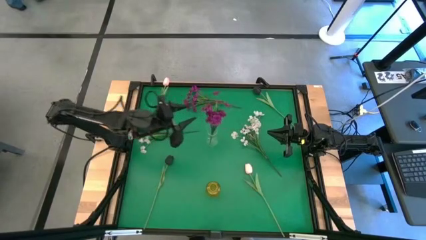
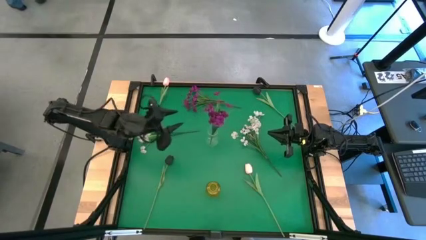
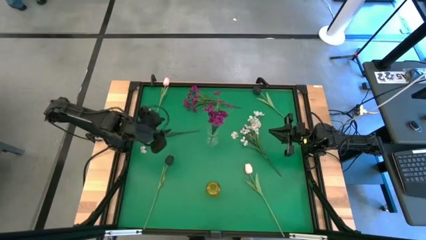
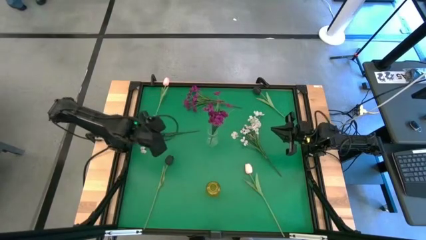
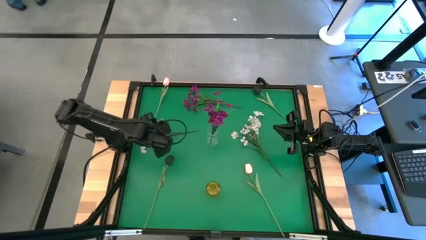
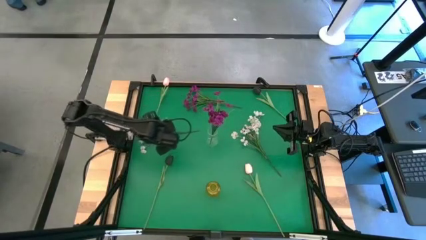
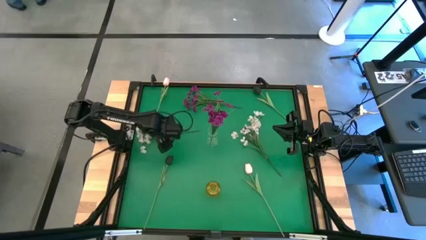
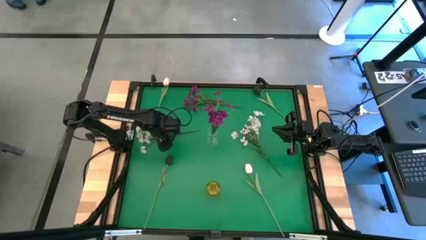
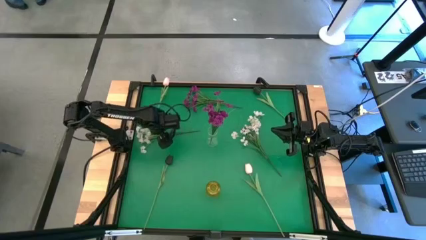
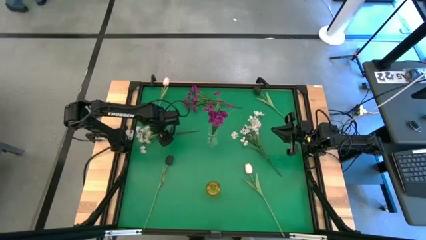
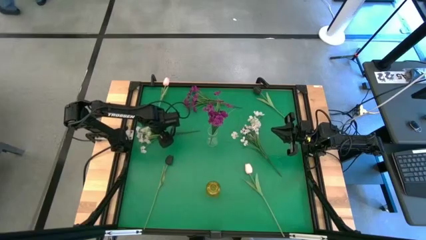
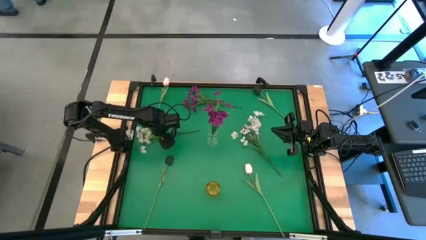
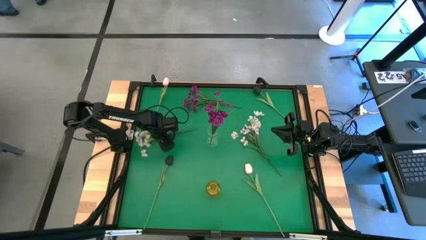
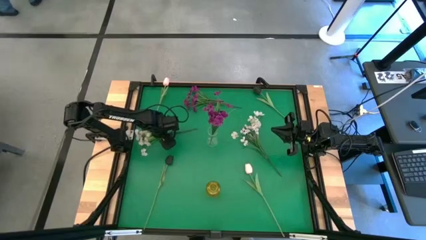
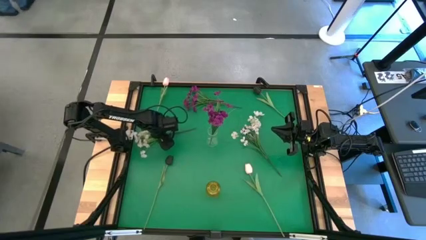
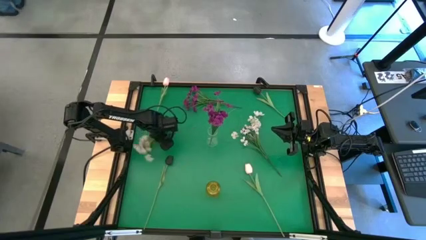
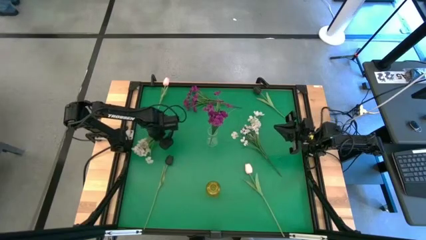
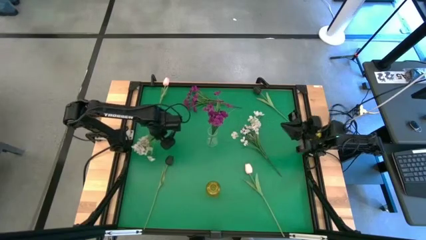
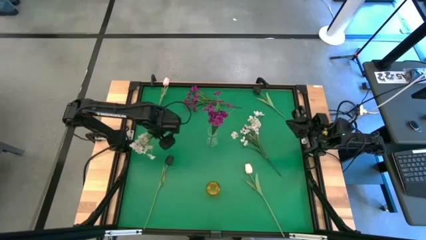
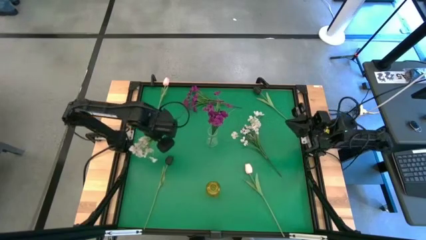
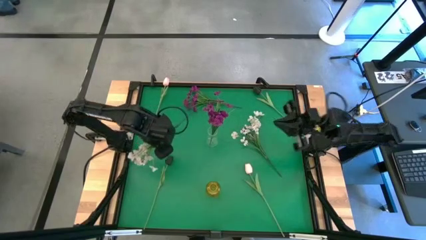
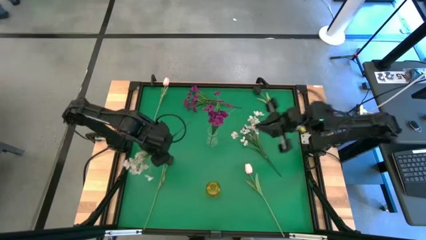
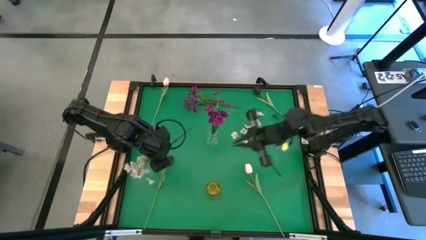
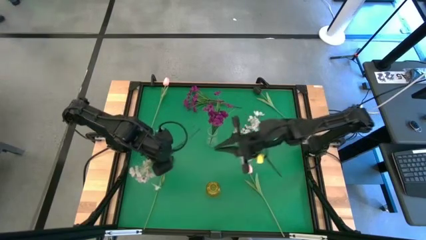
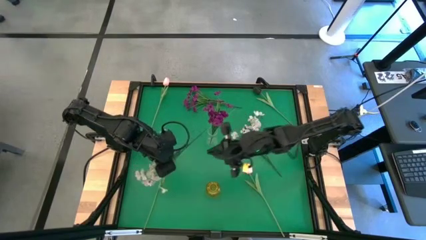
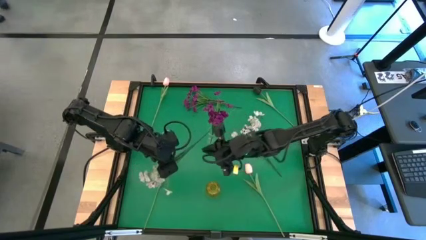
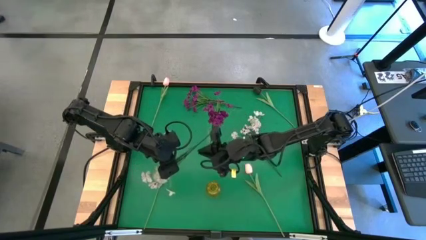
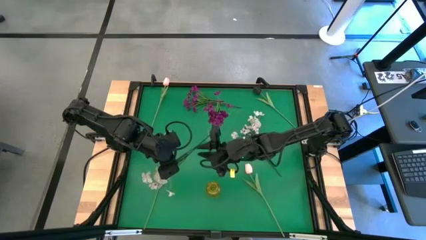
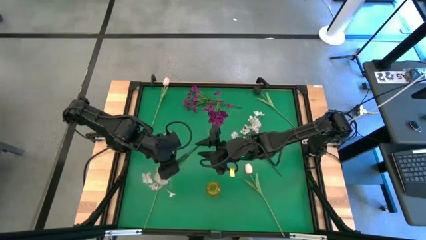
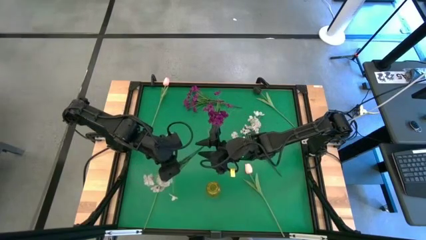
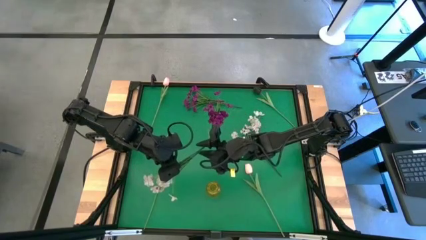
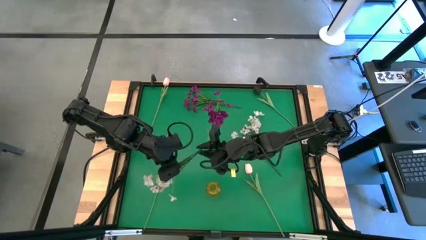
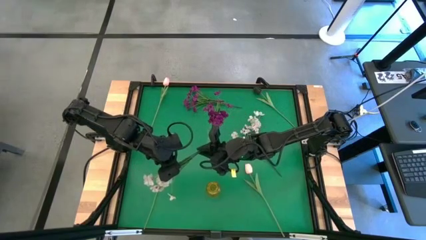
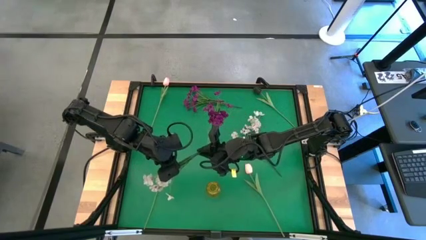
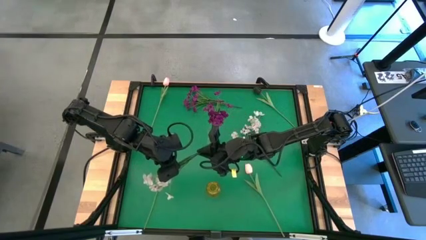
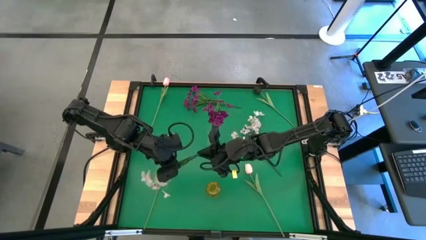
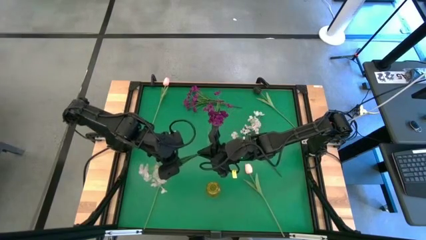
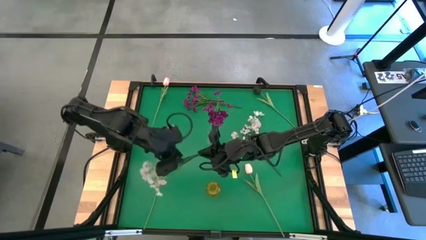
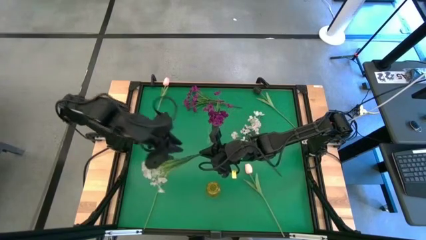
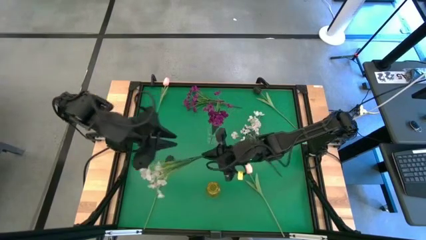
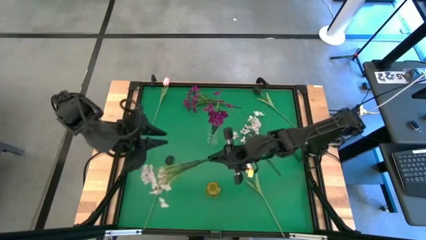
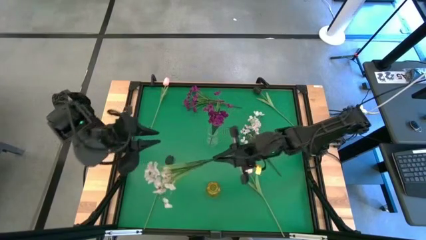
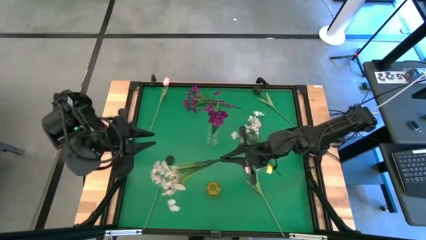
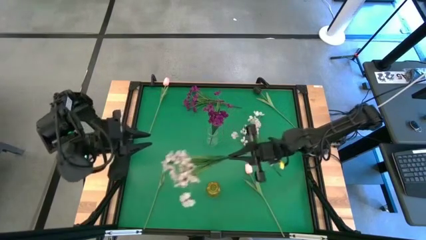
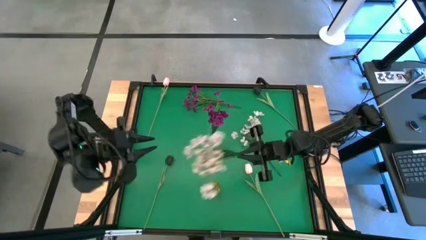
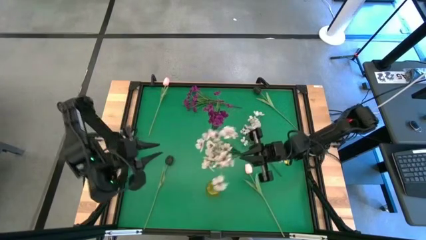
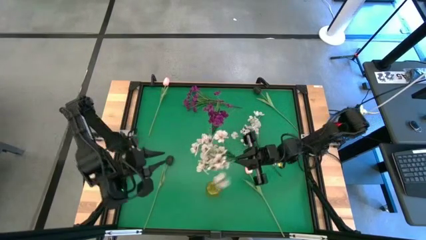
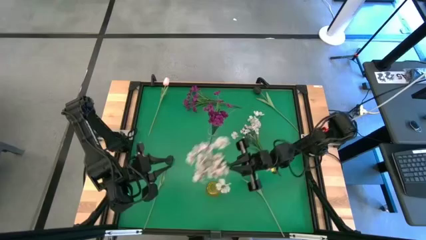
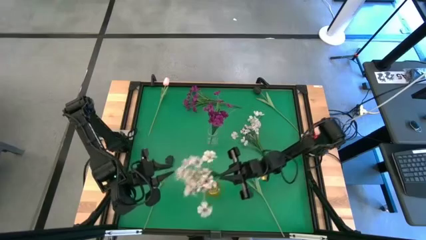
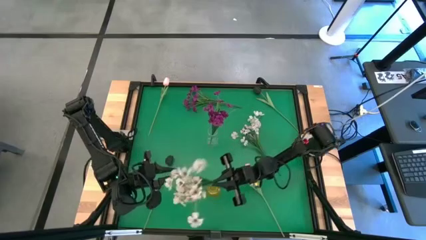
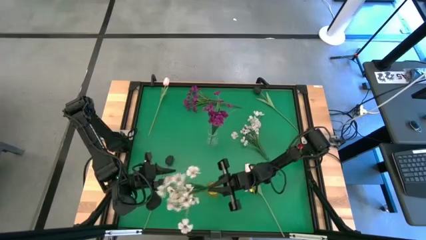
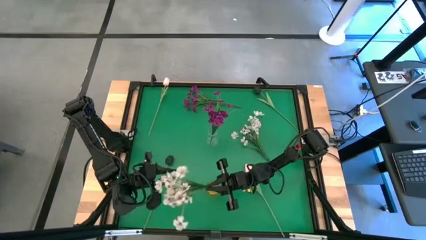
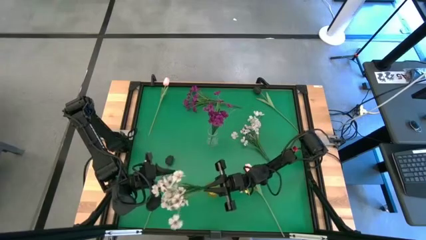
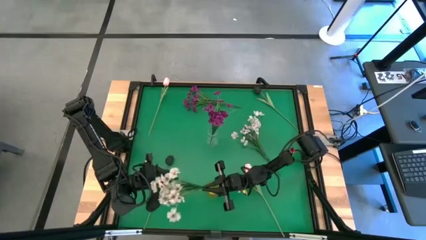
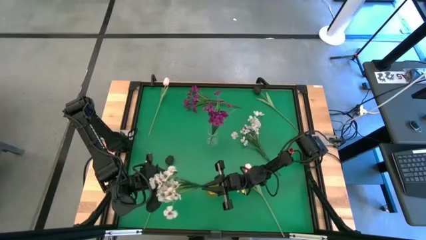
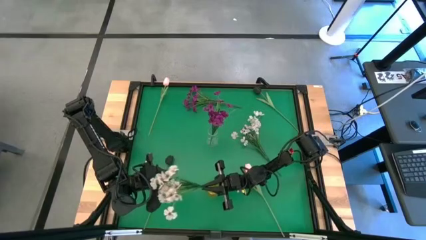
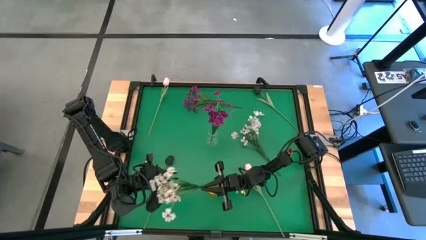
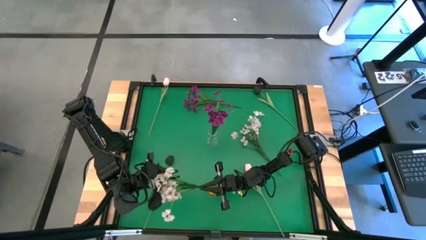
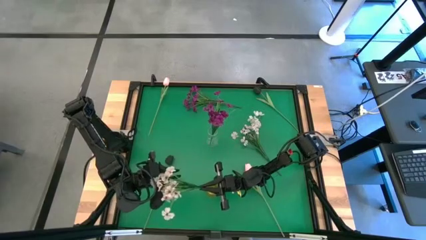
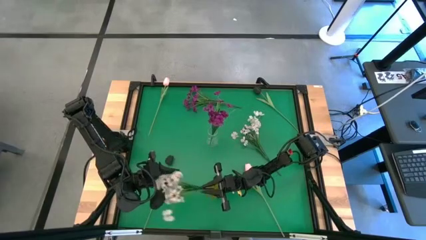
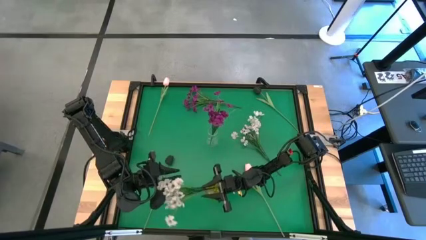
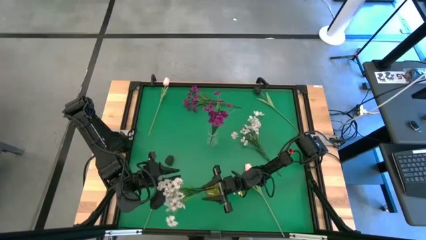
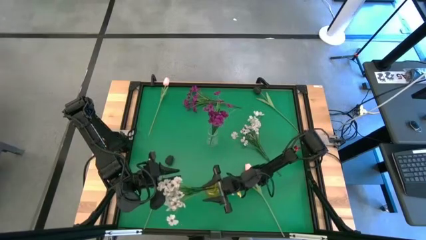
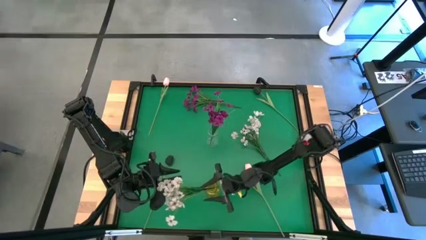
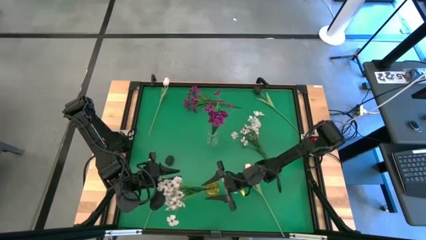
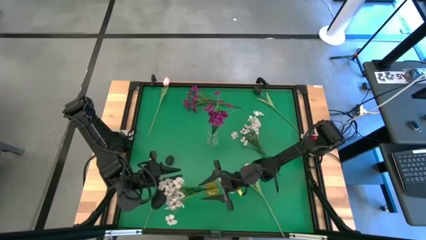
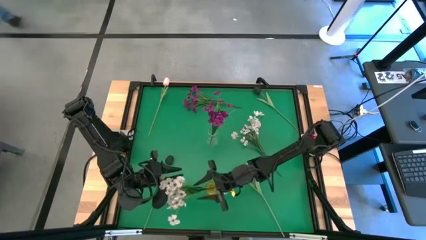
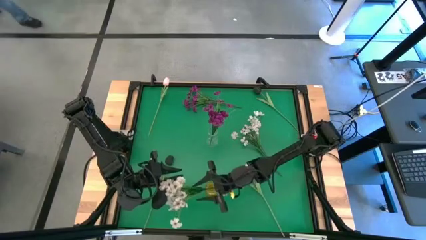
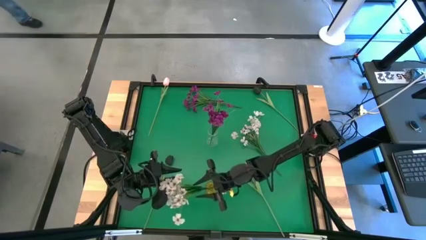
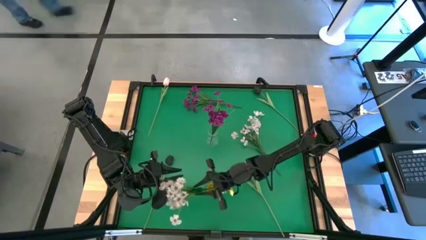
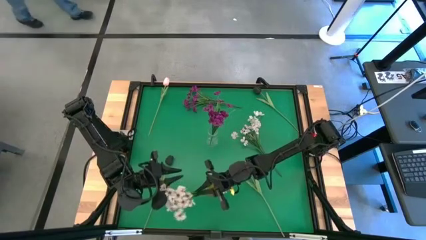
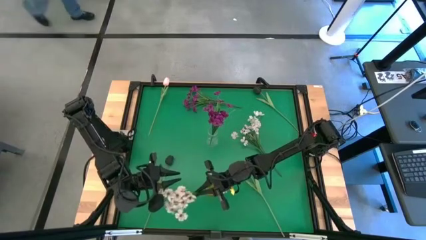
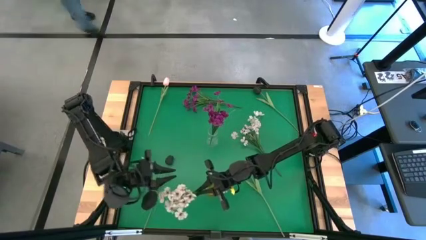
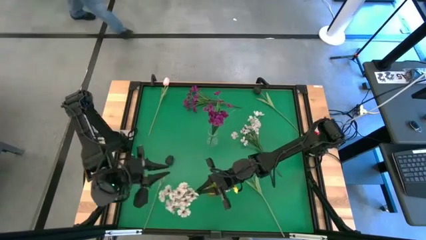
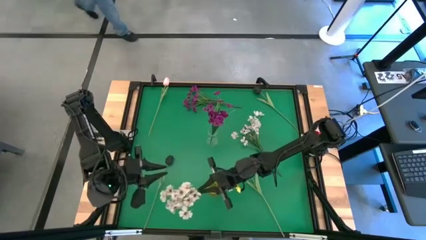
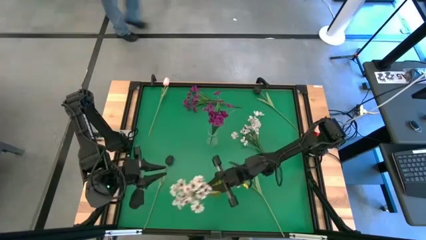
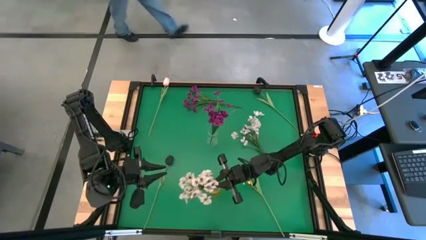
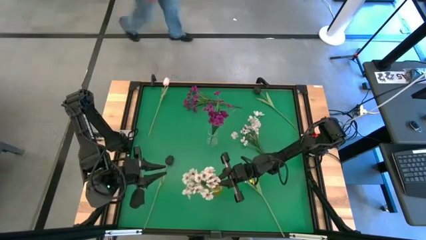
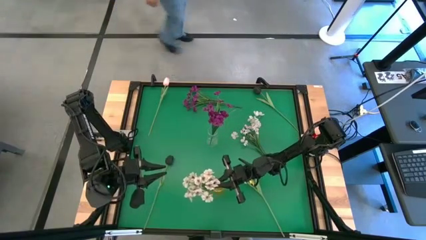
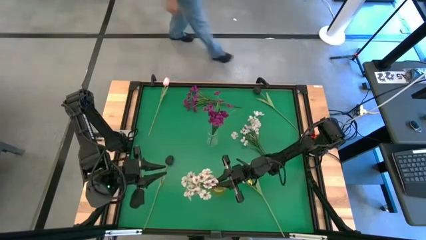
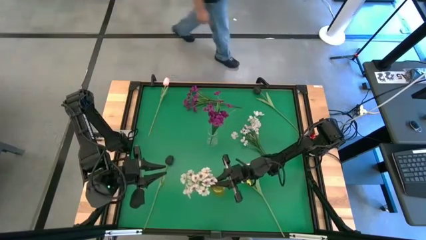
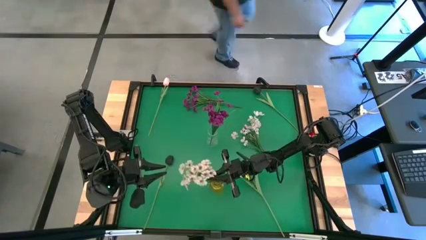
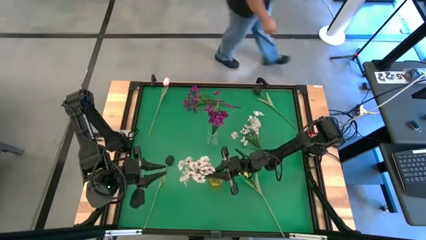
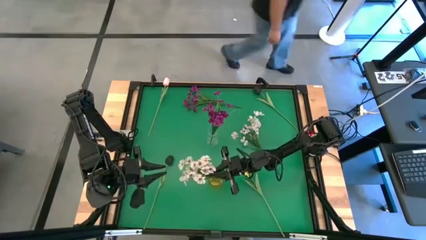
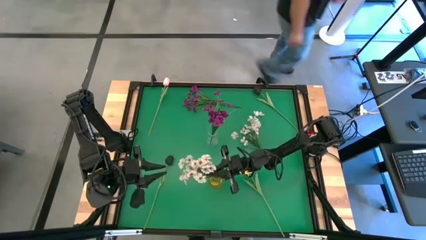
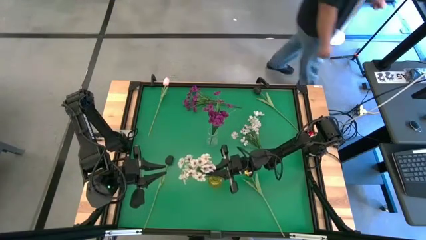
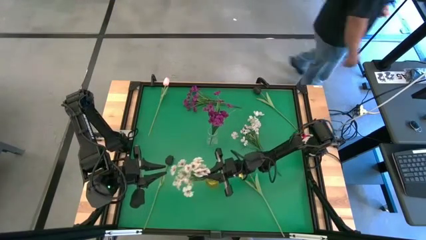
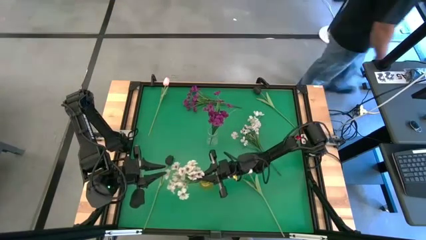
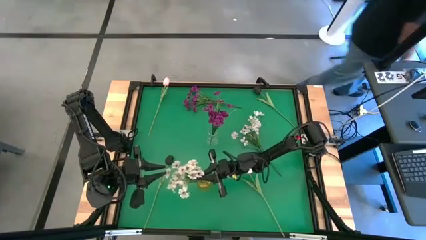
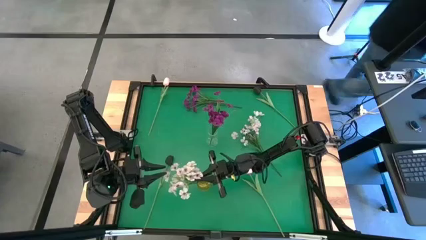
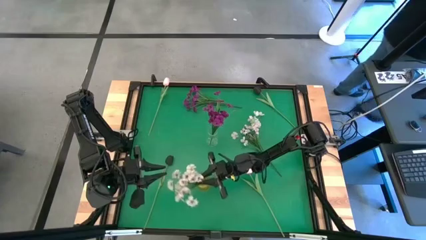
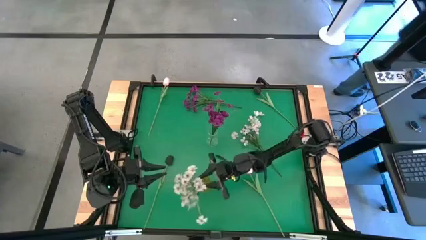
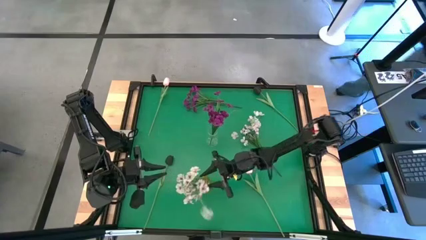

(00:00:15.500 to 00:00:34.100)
Task: Sort flowers into vase by color
Put the left white flowers into the yellow vase
